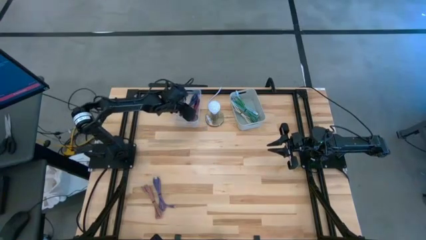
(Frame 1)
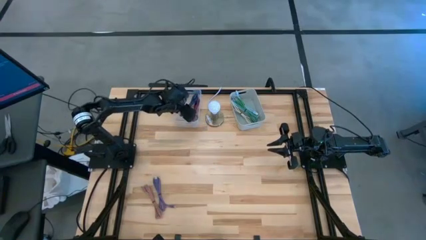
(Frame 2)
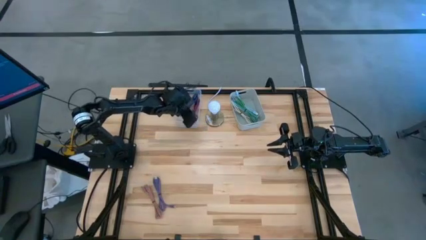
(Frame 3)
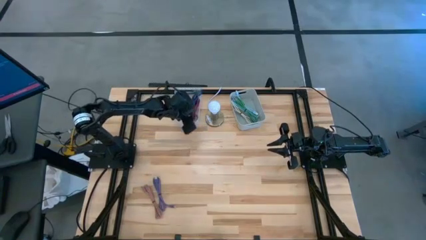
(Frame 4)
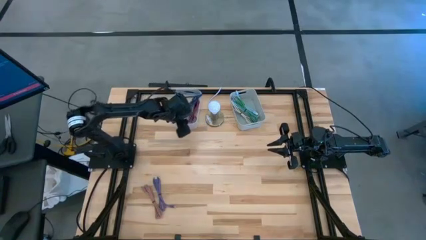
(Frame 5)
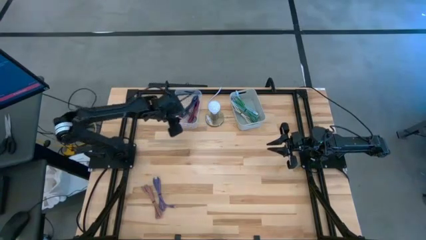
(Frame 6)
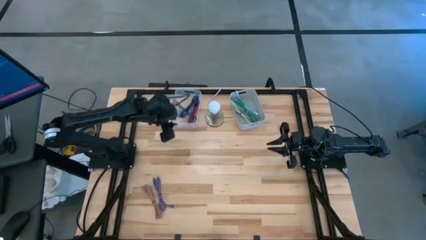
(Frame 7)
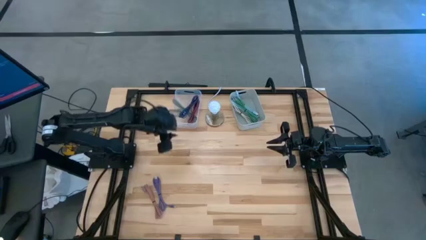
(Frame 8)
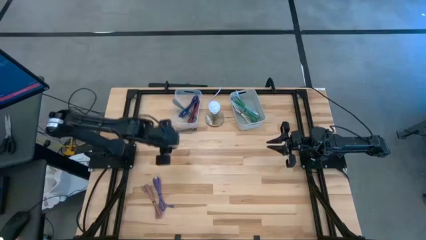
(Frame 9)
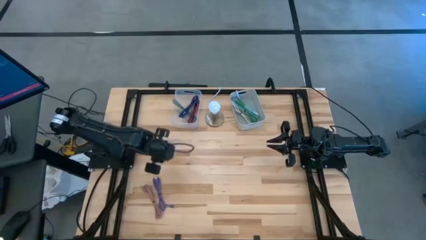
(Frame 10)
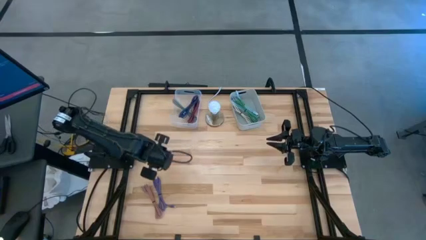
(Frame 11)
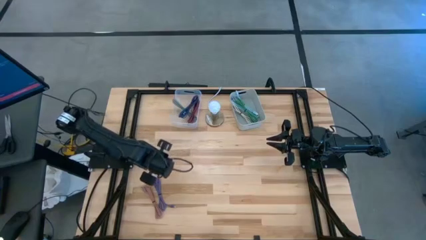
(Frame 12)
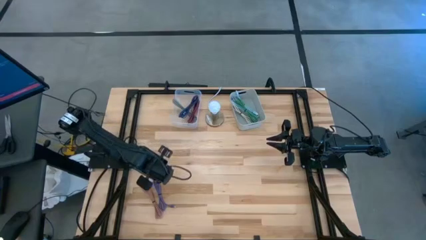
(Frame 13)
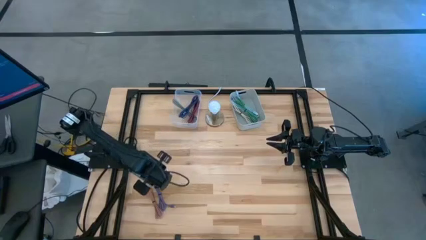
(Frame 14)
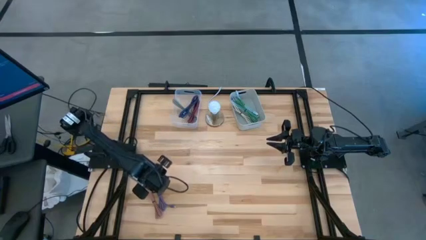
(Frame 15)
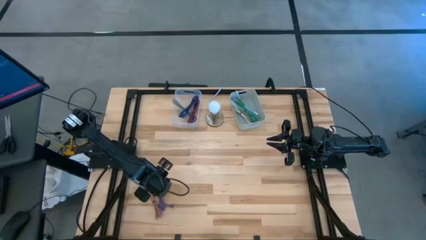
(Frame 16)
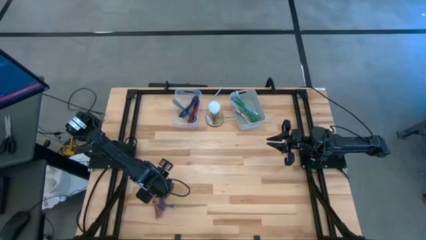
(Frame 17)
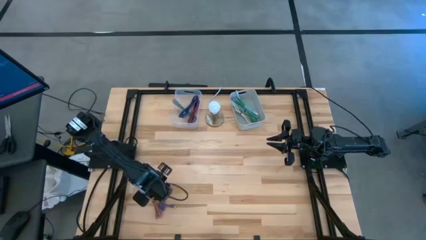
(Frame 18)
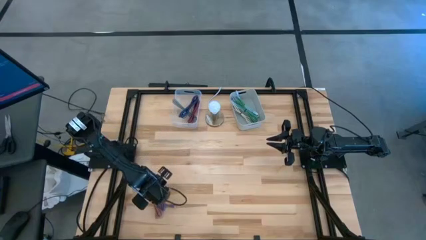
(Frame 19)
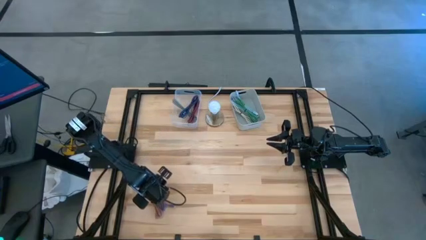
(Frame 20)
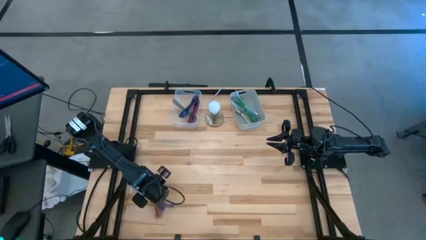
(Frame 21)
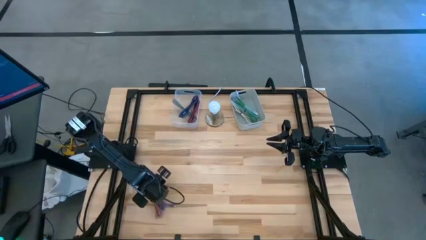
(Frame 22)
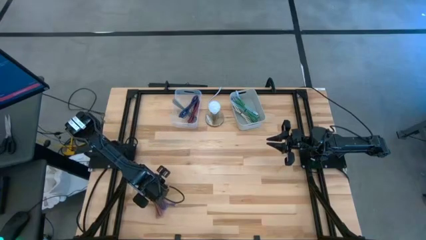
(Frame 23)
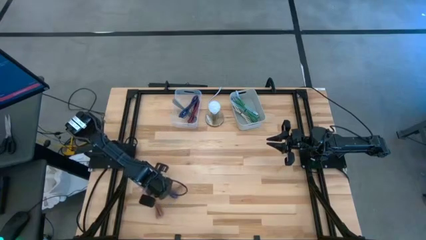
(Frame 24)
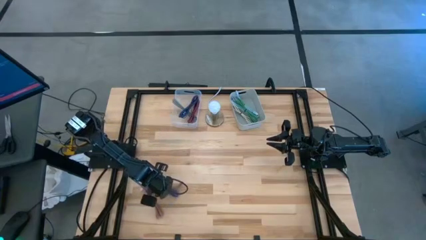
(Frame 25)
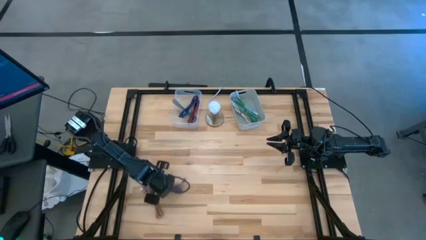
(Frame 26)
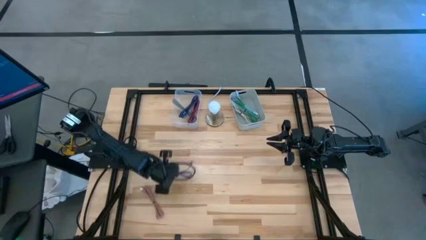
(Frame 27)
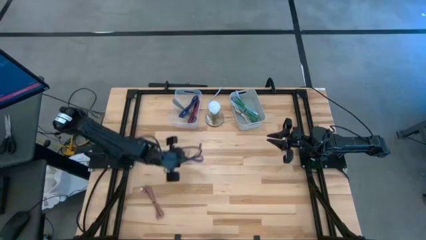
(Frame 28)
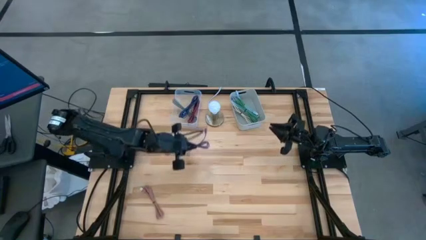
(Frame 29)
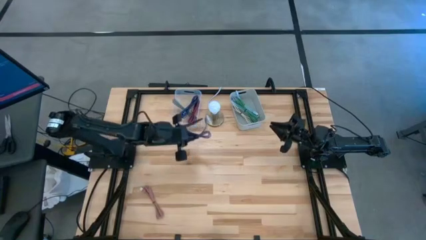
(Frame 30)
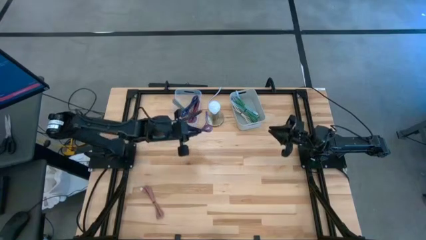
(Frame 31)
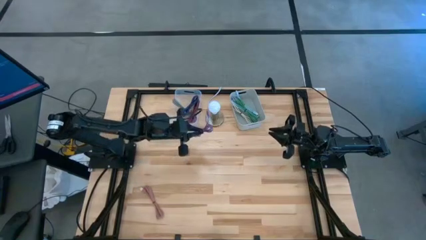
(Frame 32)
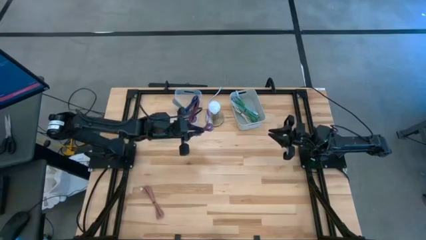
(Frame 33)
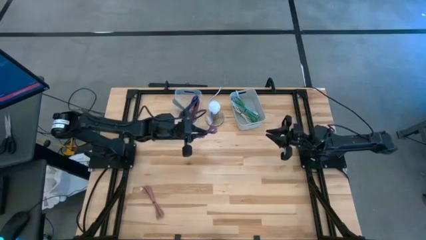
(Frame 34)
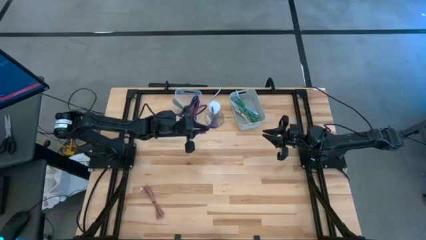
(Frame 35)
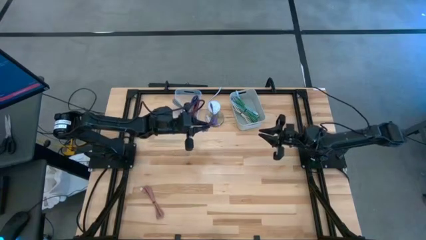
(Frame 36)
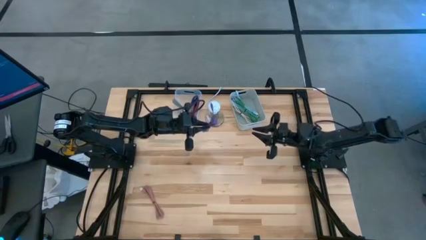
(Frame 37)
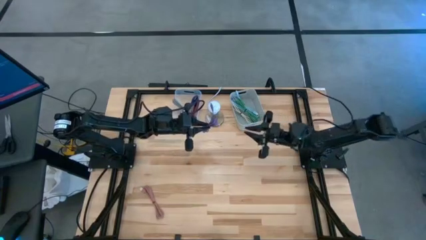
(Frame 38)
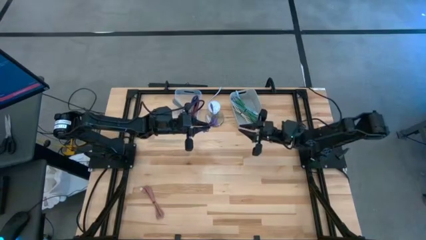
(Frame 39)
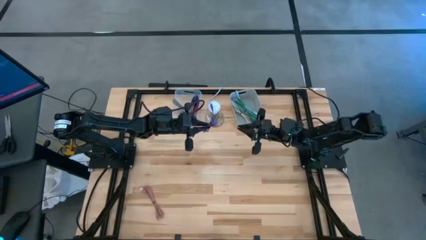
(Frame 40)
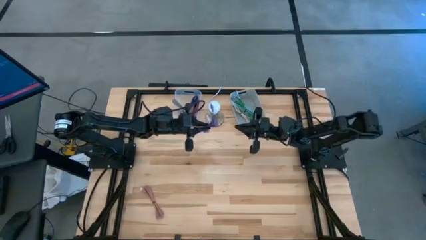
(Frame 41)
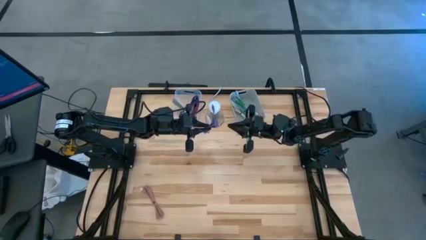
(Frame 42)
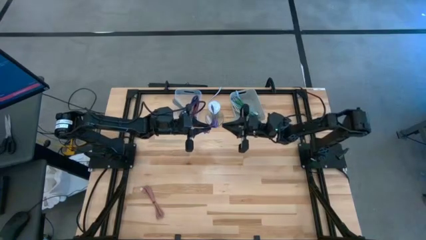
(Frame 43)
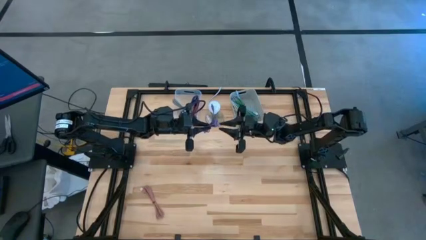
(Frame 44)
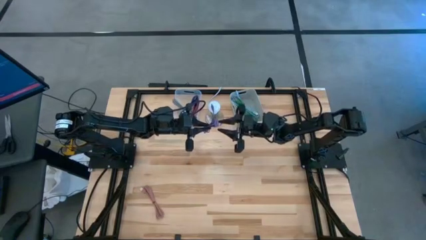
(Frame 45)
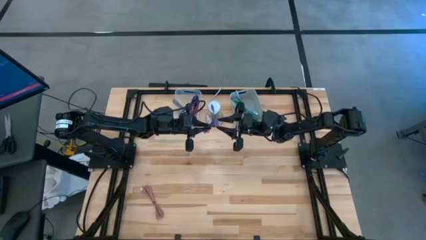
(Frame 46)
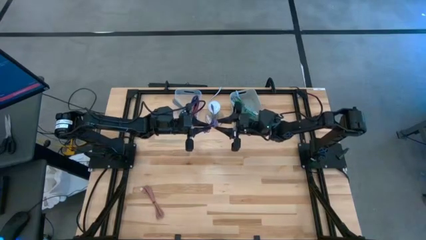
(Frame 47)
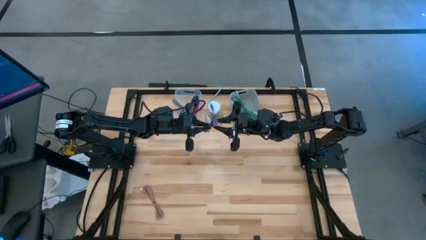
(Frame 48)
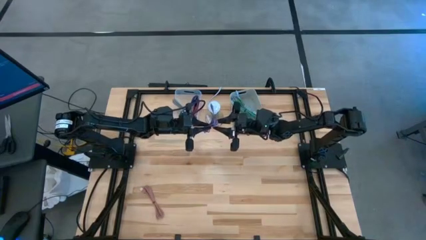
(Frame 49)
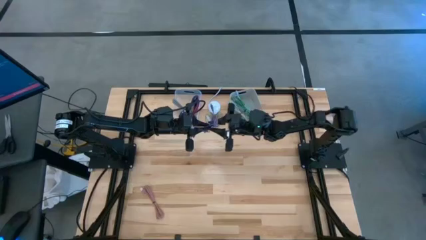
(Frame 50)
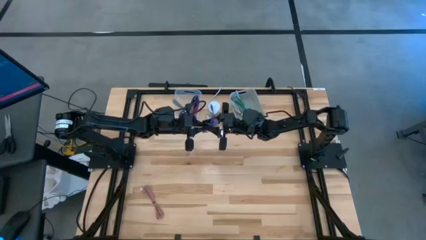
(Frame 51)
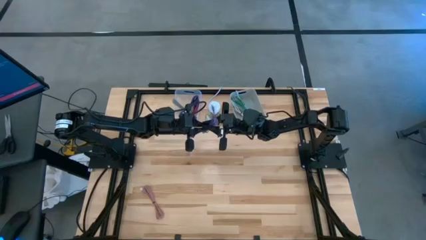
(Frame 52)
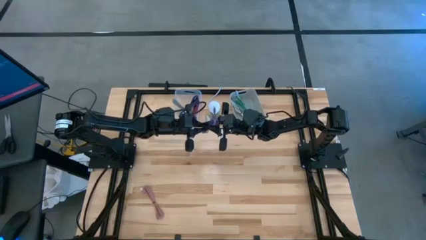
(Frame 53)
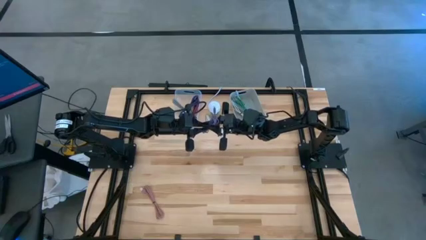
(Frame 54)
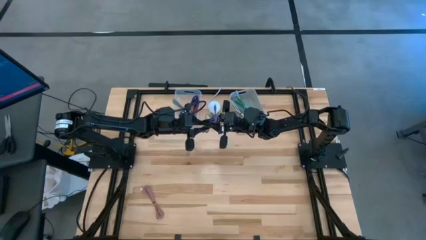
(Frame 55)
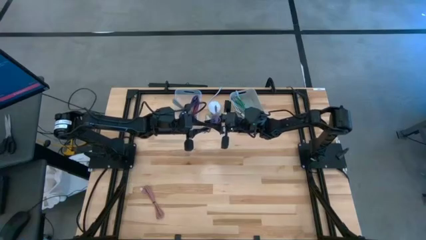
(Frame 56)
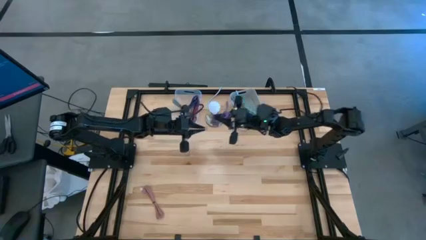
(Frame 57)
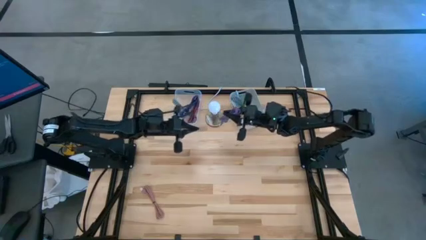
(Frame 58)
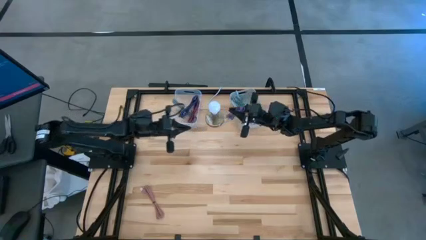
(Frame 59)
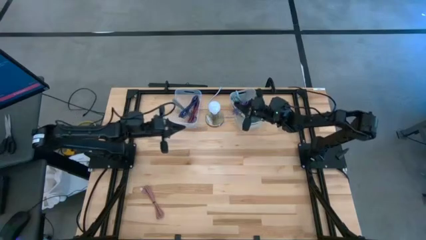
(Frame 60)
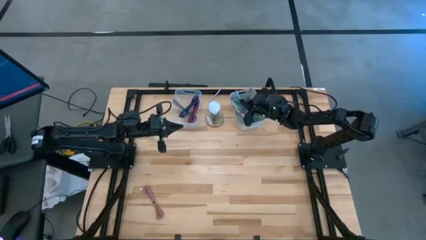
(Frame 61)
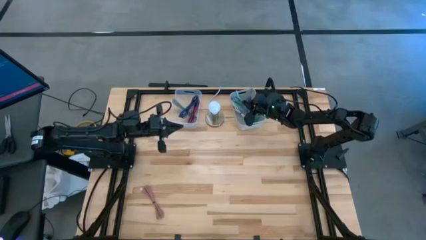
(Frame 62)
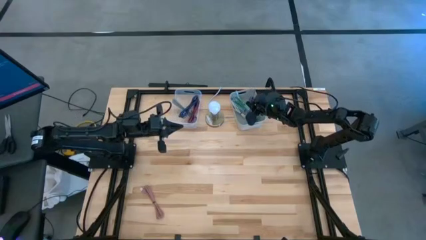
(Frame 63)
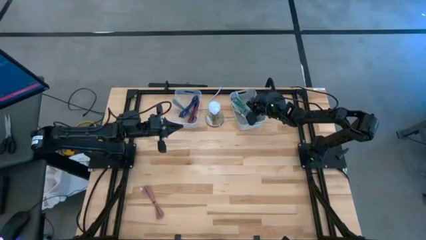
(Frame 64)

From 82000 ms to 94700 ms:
Task: Pick & Place USB Port
Put the purple charger cable into the gray bin

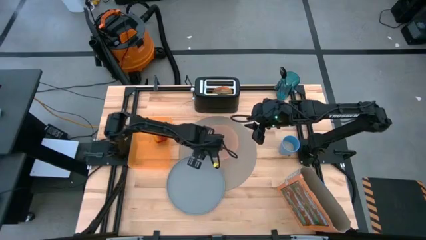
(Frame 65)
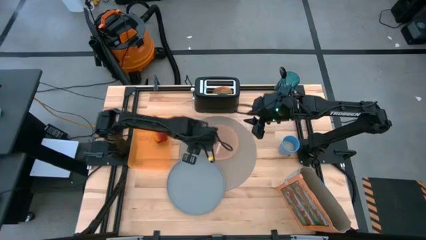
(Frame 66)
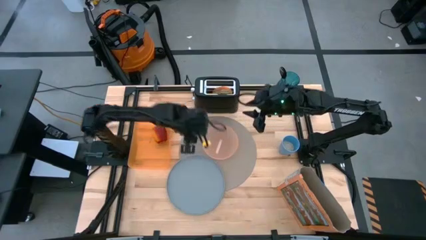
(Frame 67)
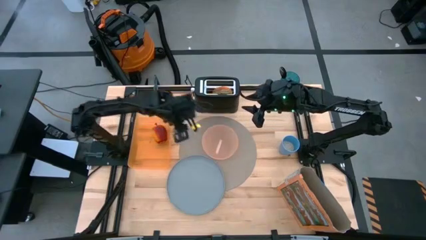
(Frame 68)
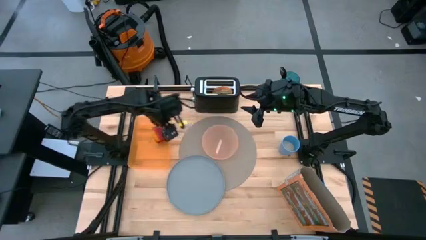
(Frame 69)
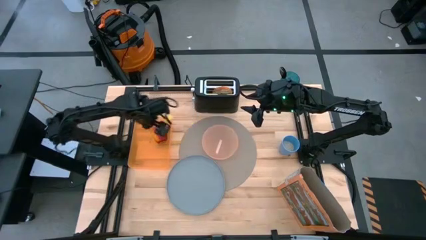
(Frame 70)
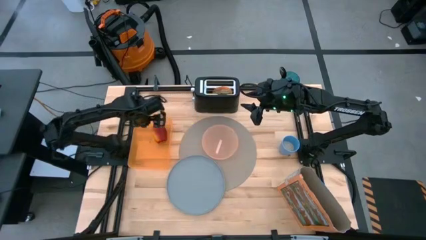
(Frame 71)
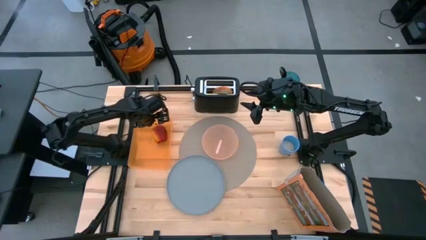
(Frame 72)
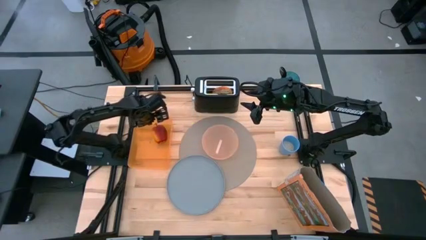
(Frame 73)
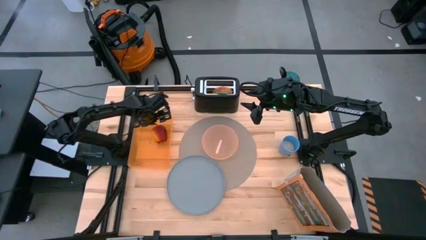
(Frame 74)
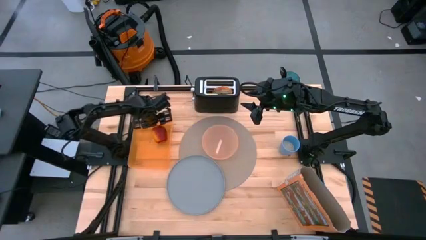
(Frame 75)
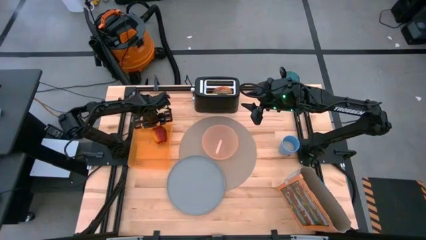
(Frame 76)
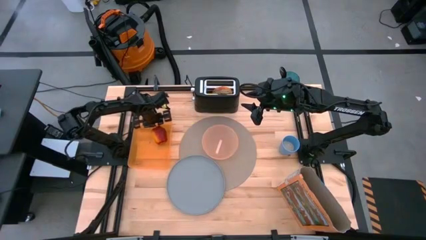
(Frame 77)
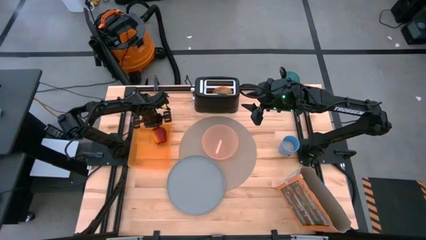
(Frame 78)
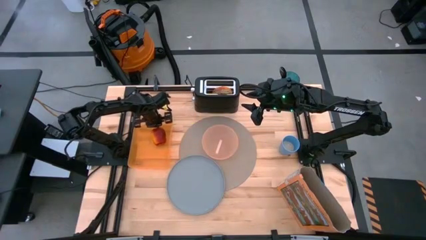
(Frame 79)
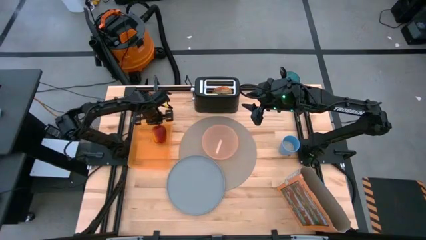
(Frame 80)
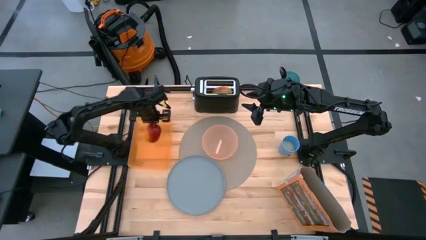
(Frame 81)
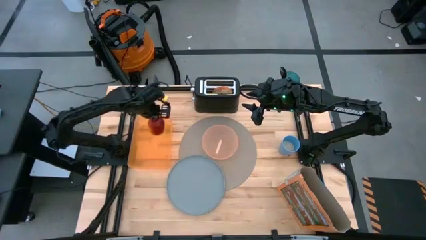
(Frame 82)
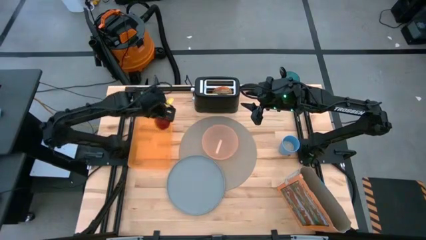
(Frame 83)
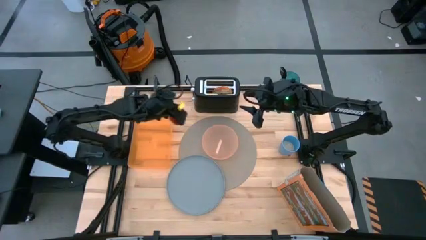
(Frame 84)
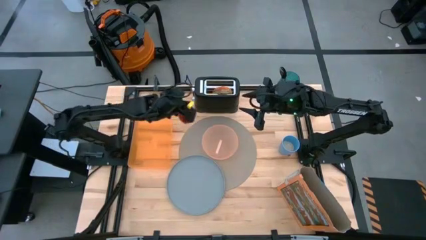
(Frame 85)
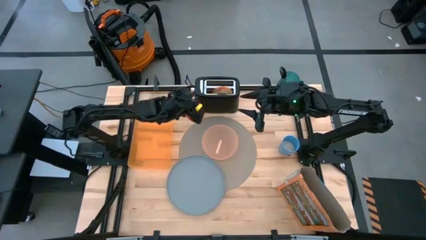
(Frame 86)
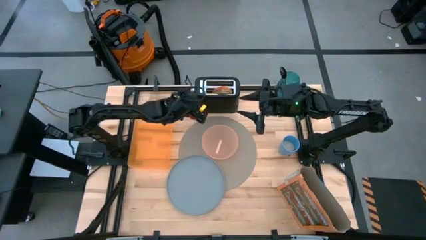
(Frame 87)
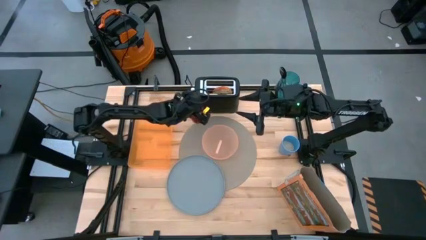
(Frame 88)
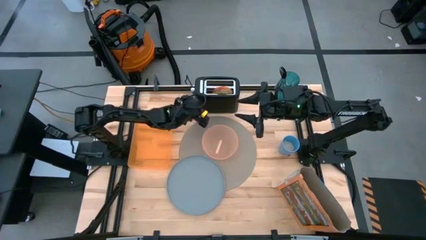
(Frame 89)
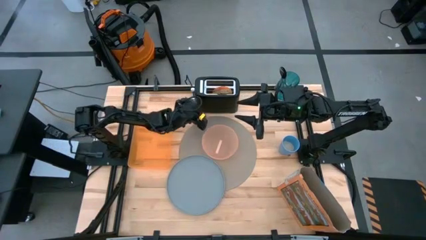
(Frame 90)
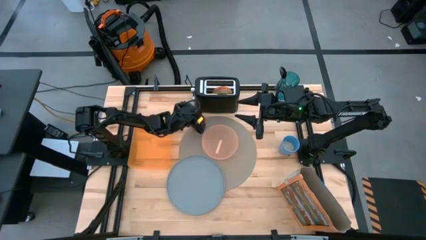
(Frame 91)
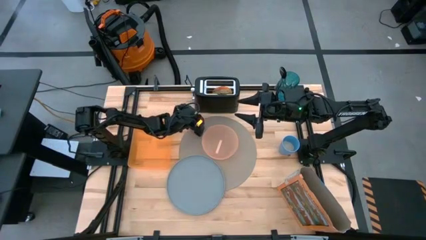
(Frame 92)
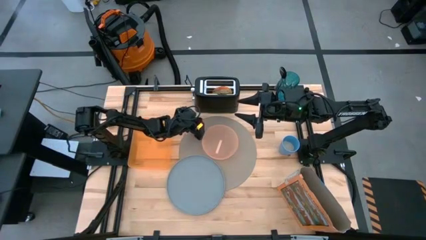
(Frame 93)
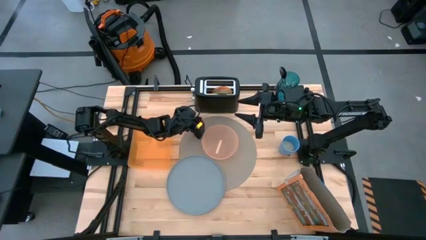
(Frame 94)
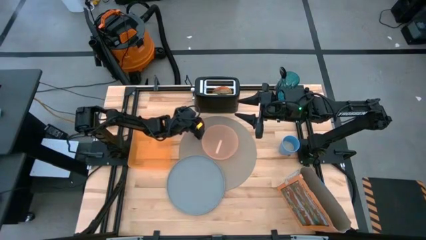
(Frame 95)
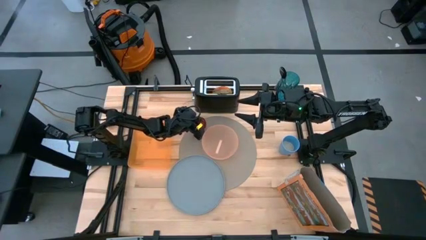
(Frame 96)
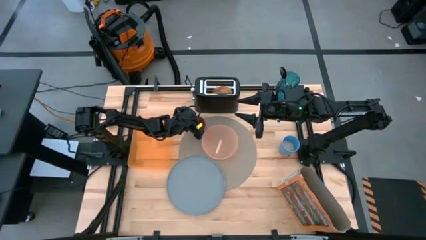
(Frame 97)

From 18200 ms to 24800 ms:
Task: Arrange a breakfast setting
Put the red apple to the top left of the orange bowl on the gray table mat
